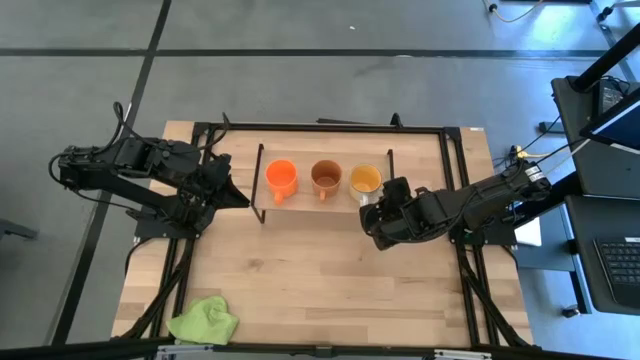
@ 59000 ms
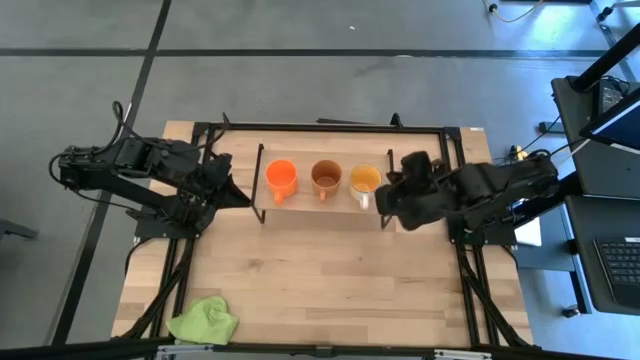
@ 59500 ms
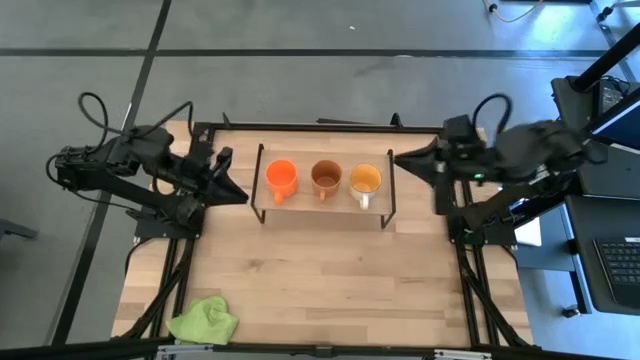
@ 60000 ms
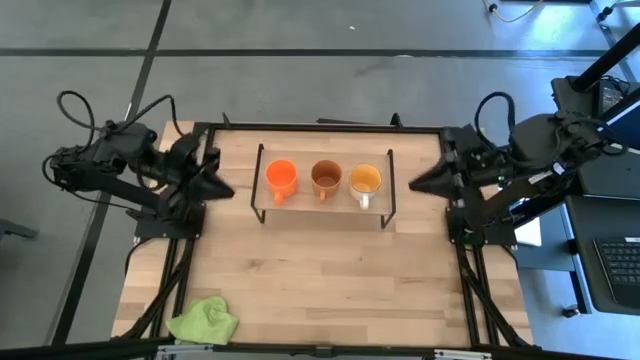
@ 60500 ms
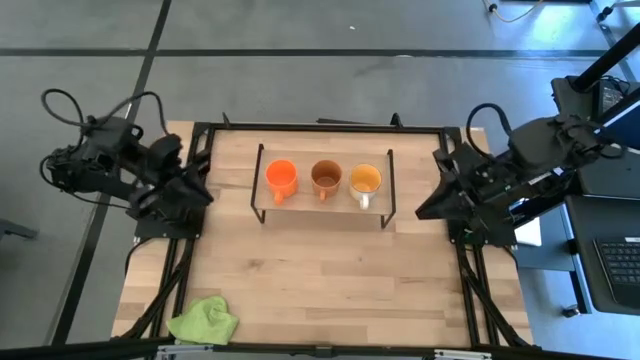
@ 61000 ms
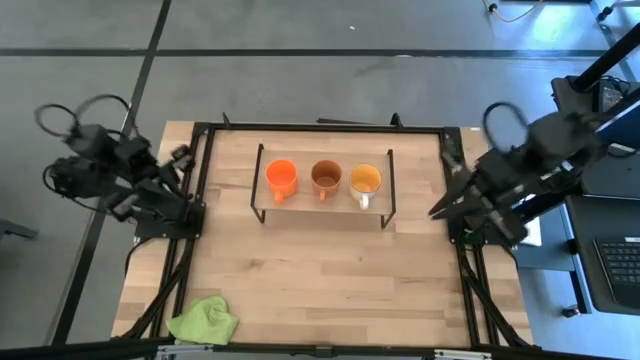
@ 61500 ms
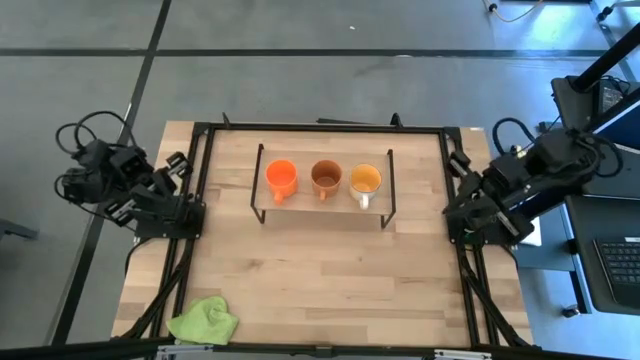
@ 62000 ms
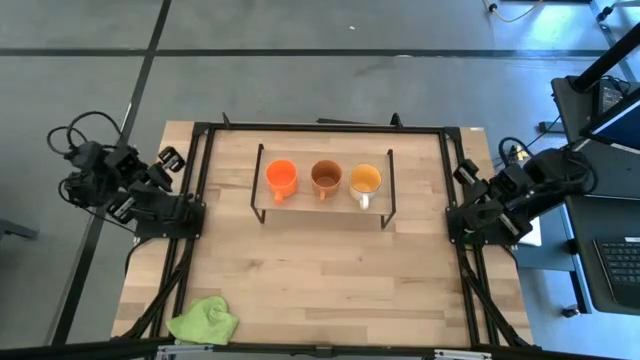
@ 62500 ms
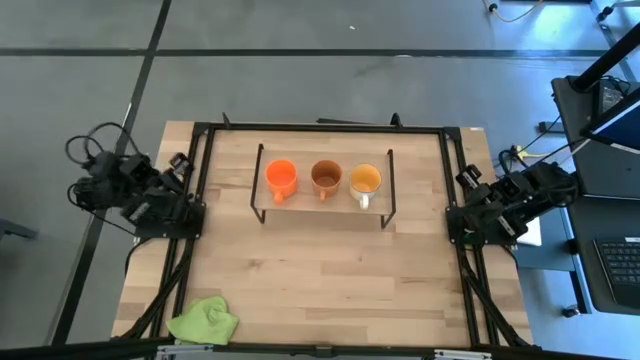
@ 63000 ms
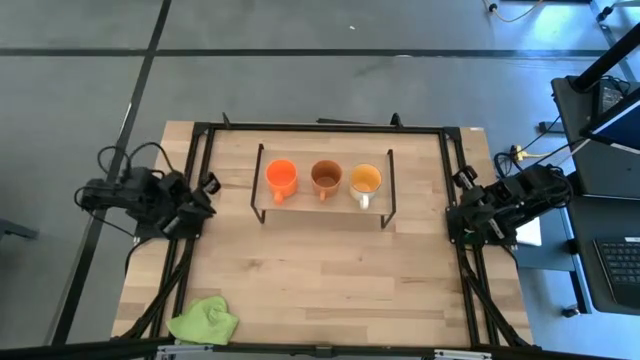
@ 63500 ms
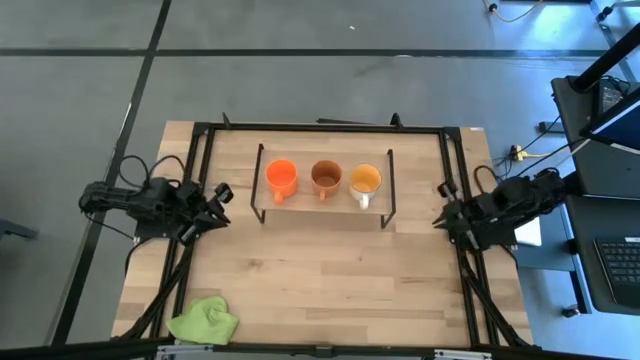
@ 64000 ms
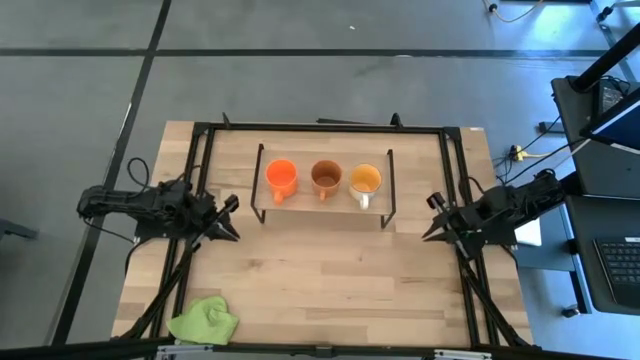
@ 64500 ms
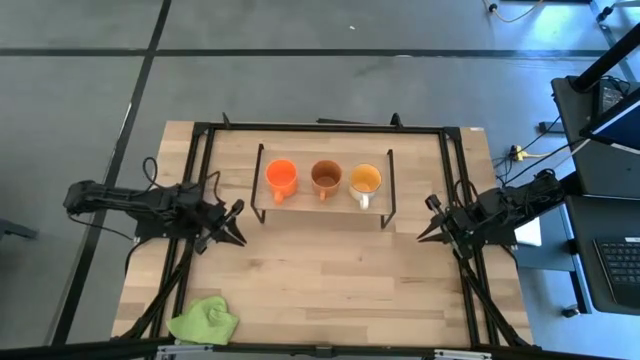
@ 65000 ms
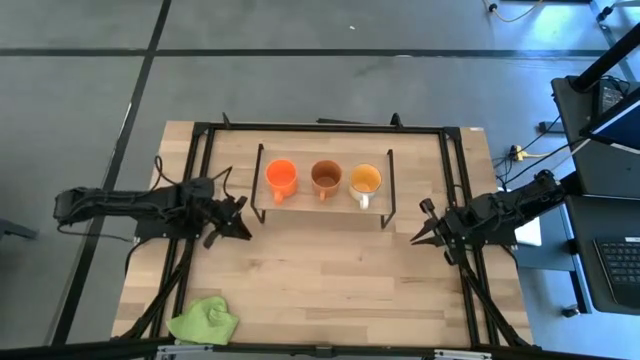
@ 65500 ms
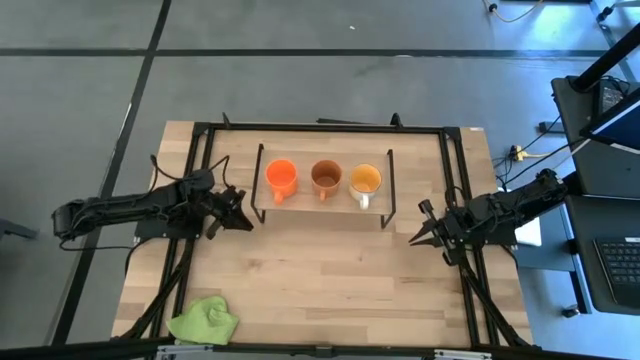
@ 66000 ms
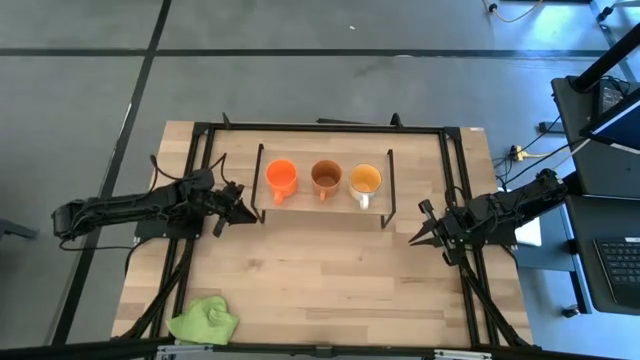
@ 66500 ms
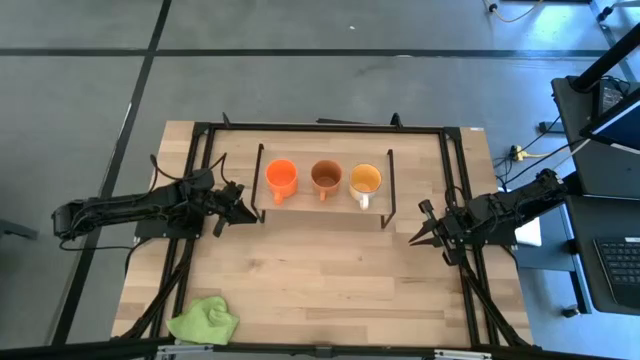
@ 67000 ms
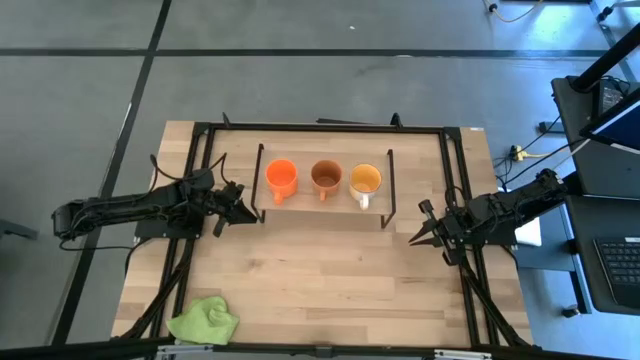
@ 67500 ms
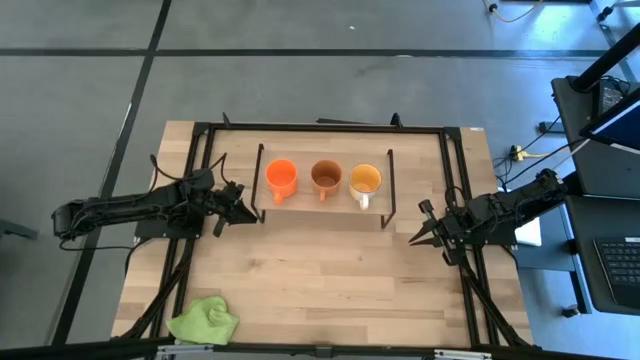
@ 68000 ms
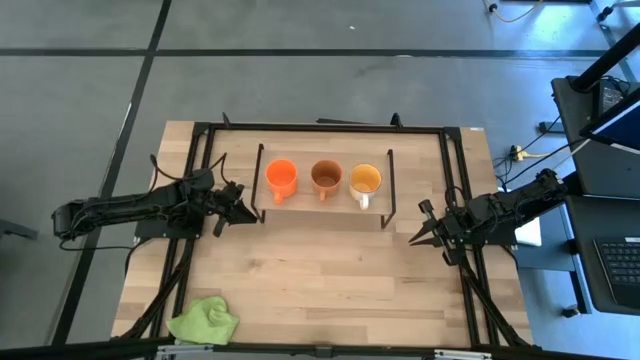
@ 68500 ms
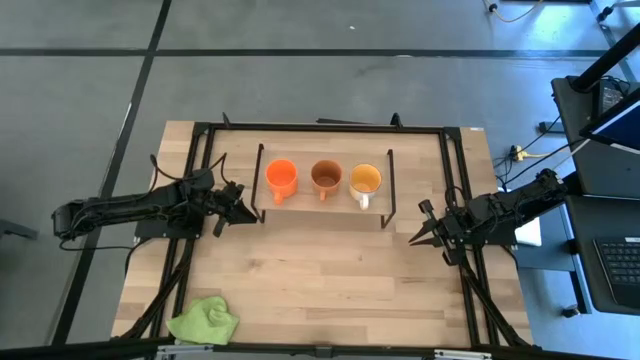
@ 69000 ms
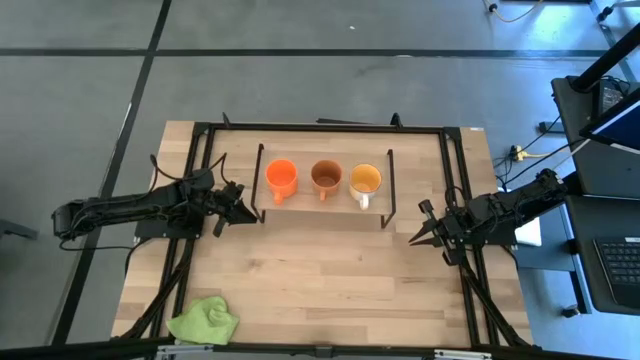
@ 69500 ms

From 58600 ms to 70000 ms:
Task: Stack small to large cups/mugs on shelf
Return to Home Position

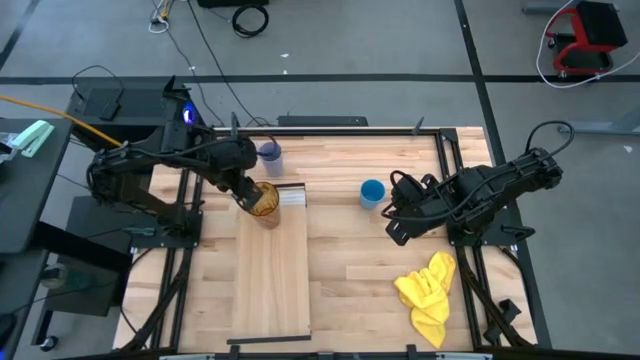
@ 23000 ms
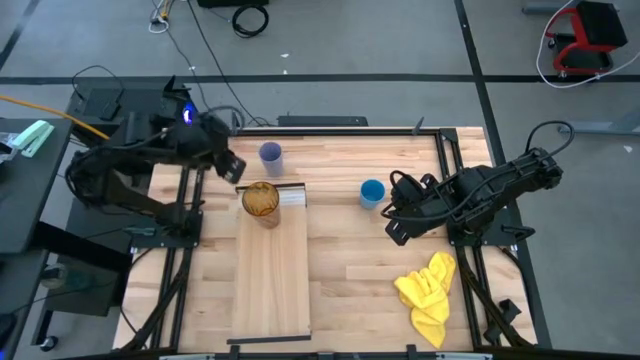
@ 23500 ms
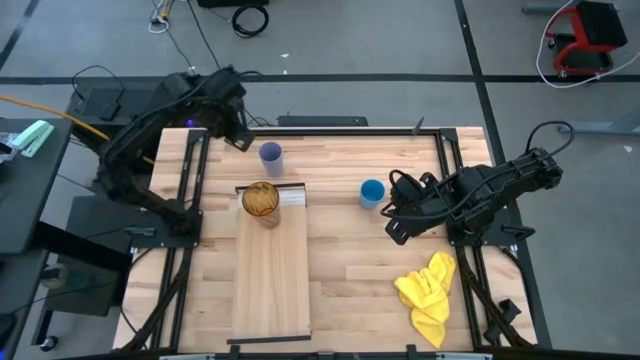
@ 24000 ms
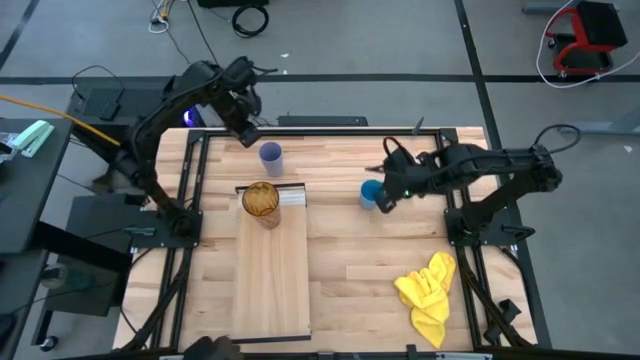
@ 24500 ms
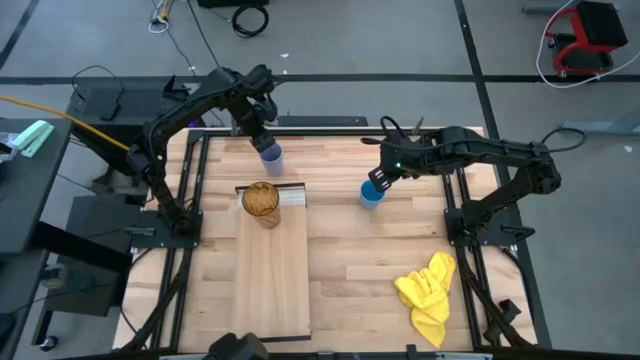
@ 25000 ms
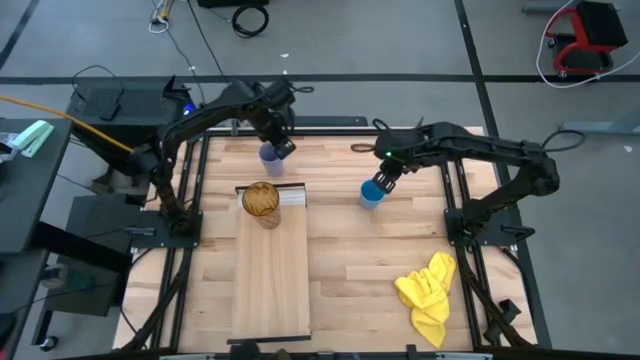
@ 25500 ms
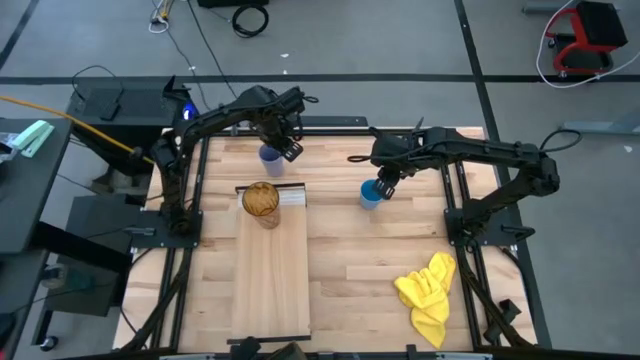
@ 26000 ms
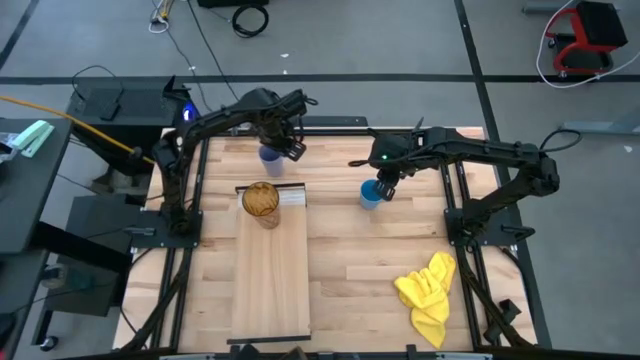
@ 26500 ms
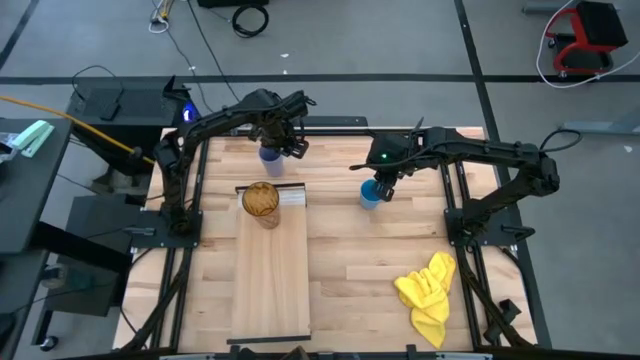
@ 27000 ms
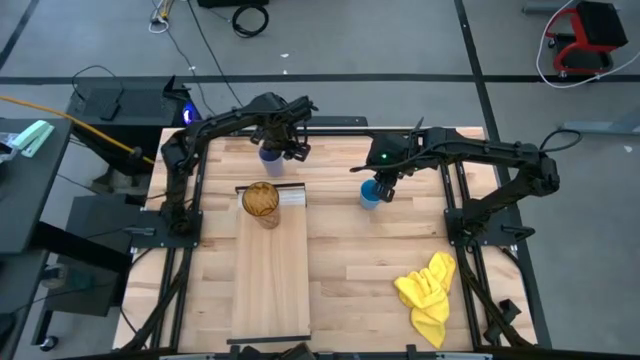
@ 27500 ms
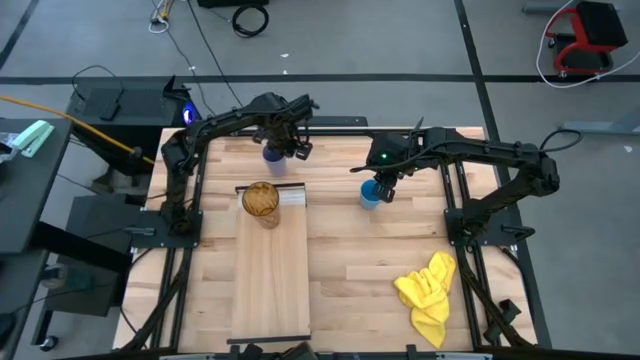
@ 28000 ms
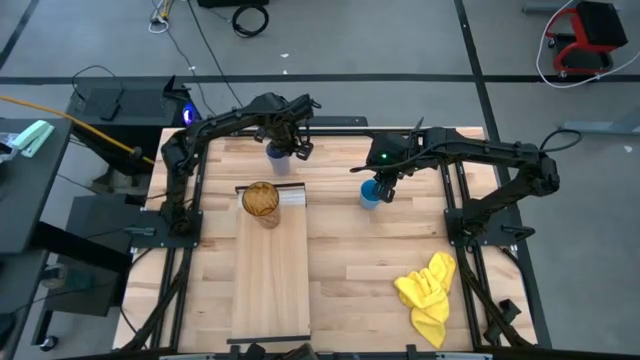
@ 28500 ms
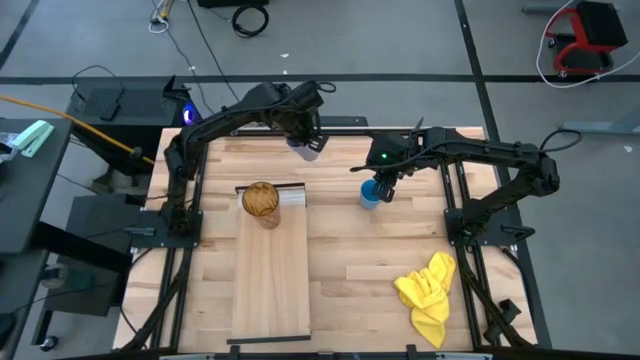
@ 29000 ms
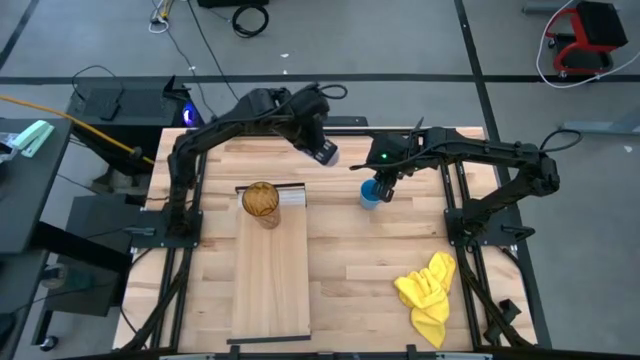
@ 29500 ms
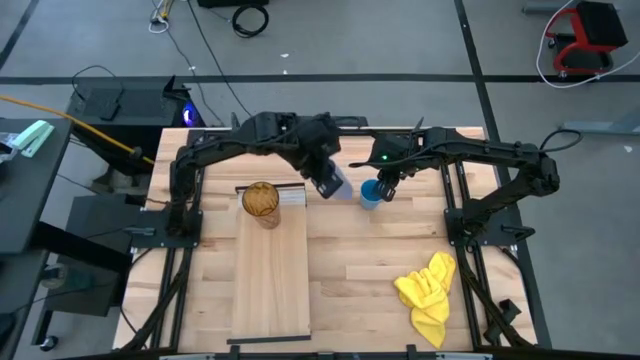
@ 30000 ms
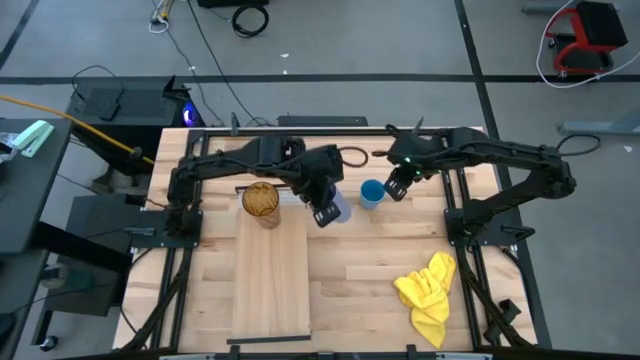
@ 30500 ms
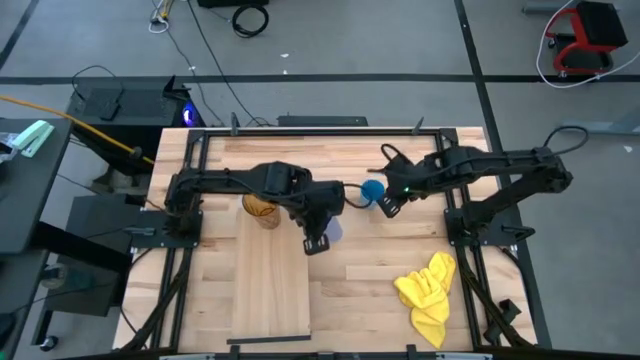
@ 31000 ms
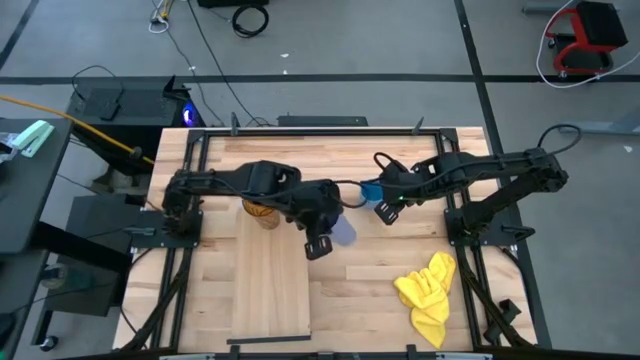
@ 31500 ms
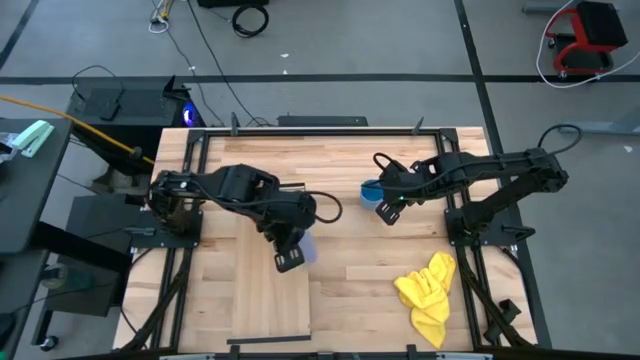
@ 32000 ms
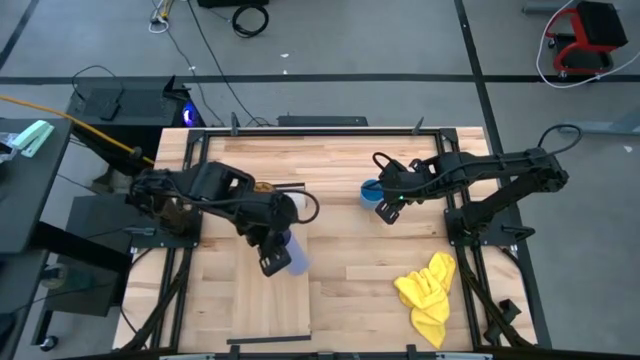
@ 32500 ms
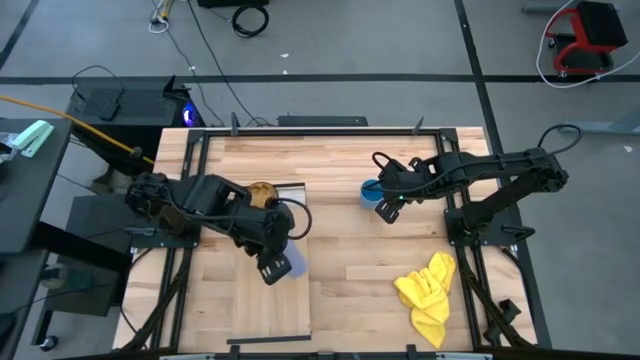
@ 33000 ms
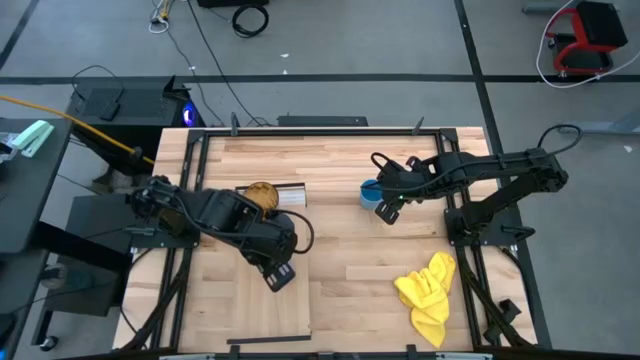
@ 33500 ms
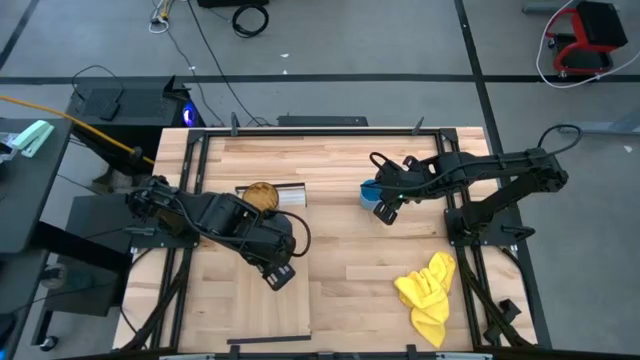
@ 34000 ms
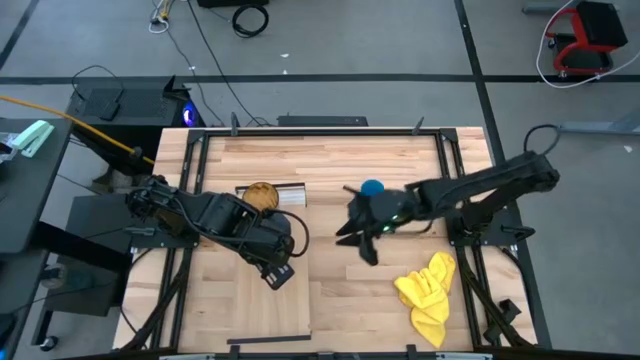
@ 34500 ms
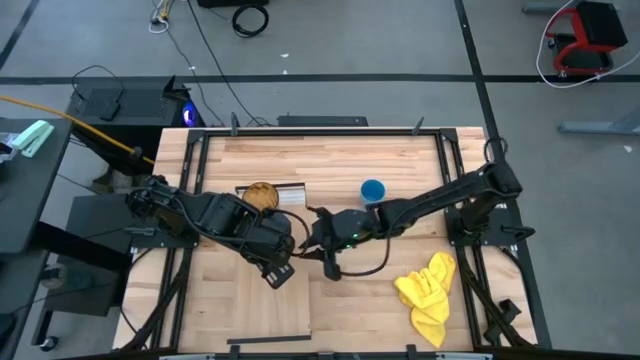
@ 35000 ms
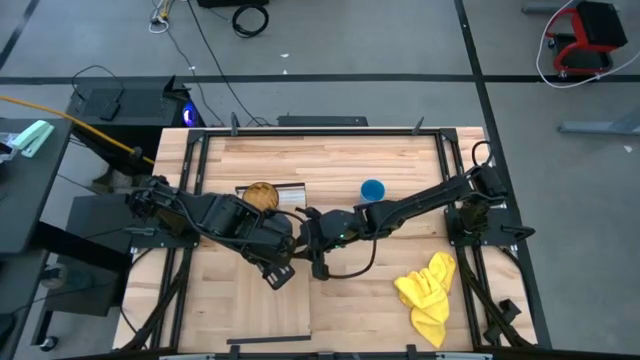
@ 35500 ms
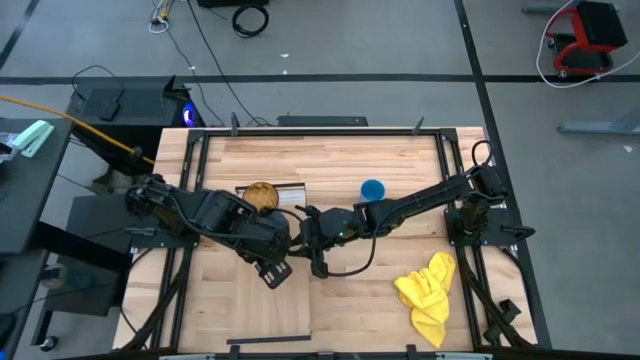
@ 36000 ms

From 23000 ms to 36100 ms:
Task: Stack small to large cups/mugs on shelf
Put the light purple cup on the shelf
